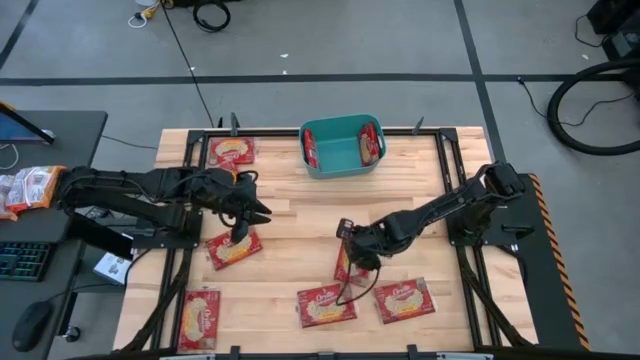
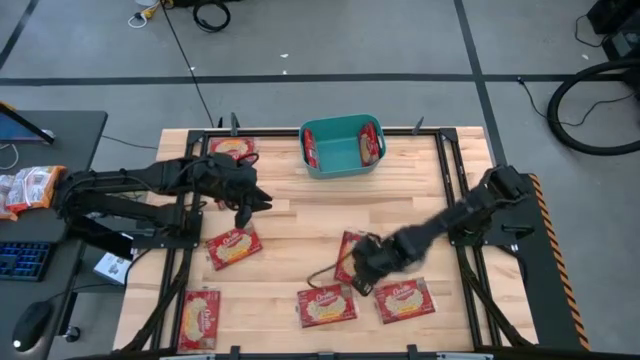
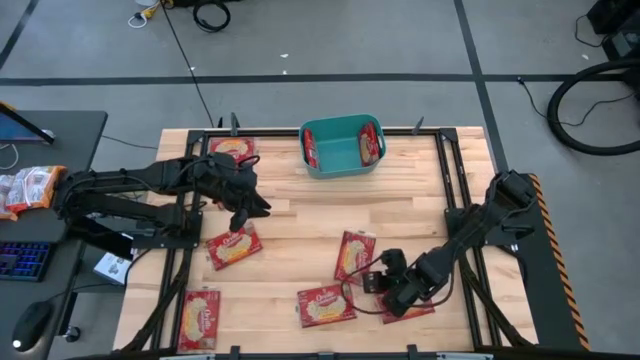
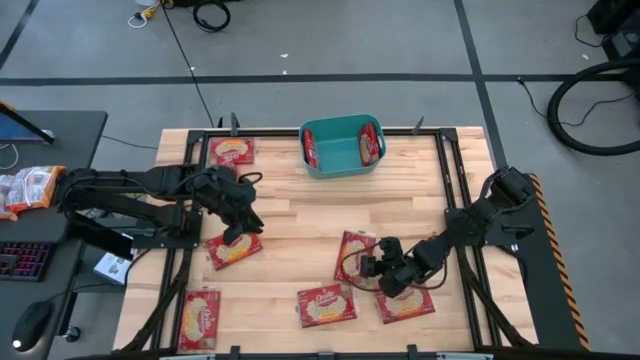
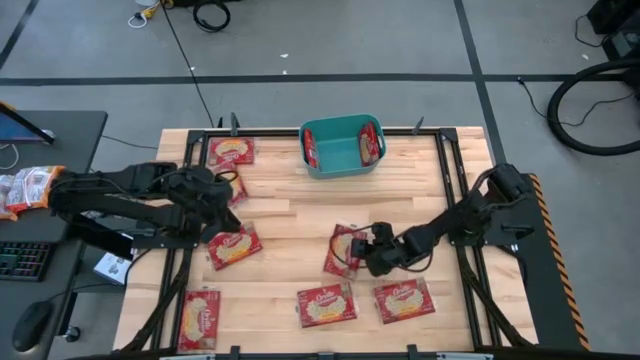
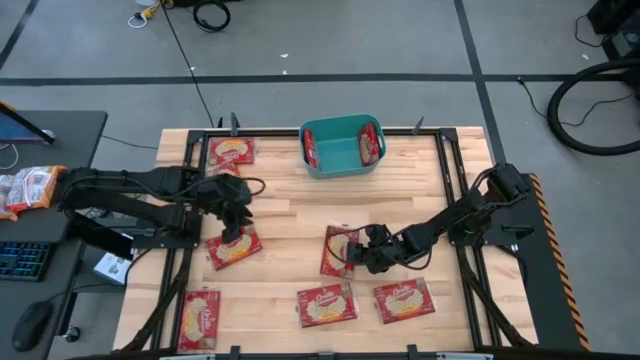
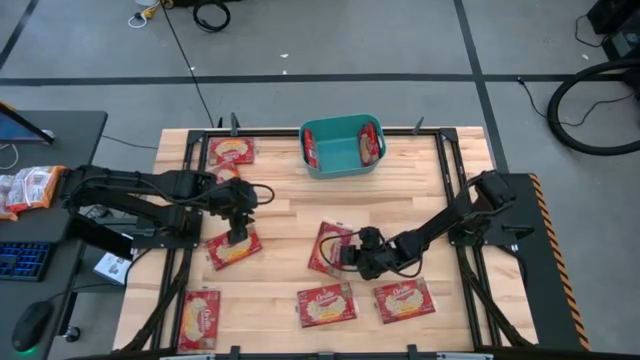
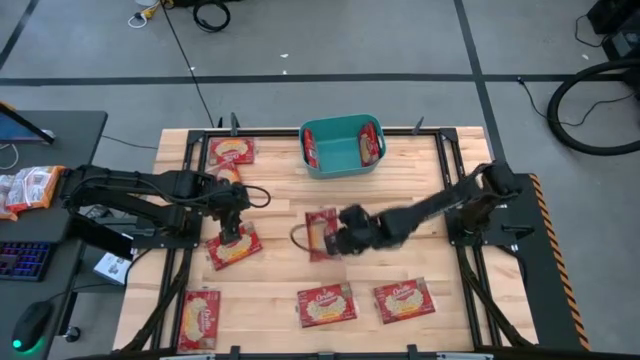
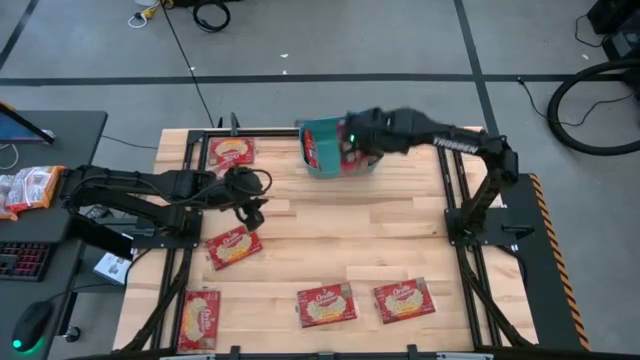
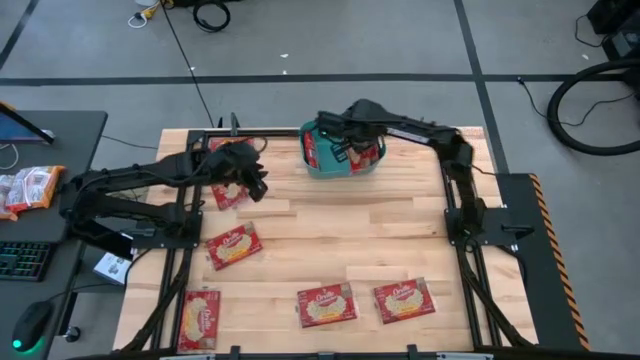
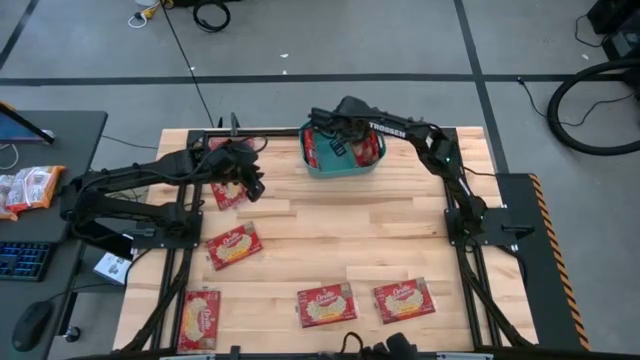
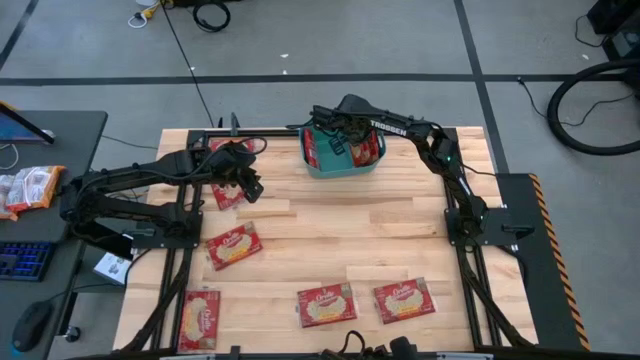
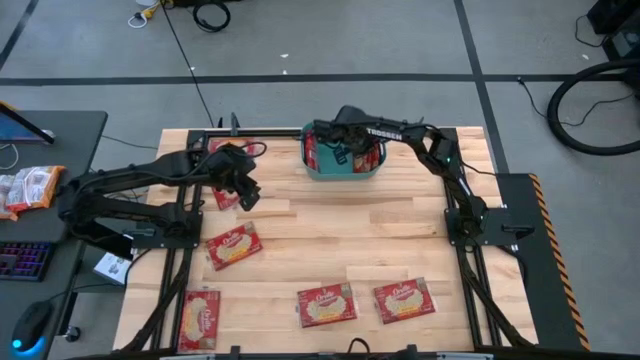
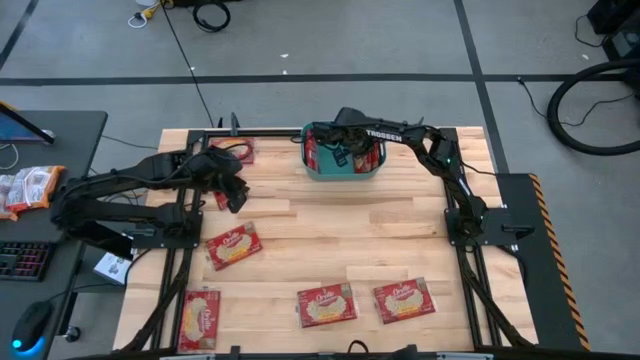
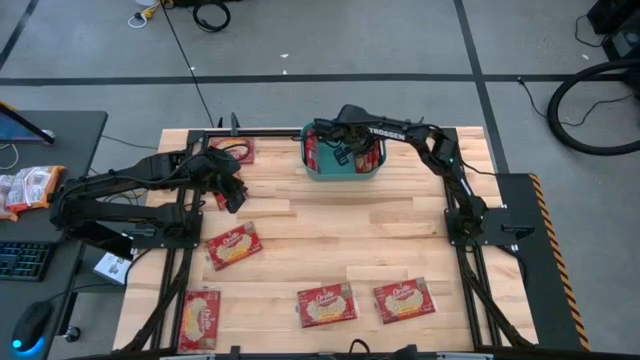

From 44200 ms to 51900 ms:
Task: Sort popcorn bags into baskets
Put the popcorn bag into the bin

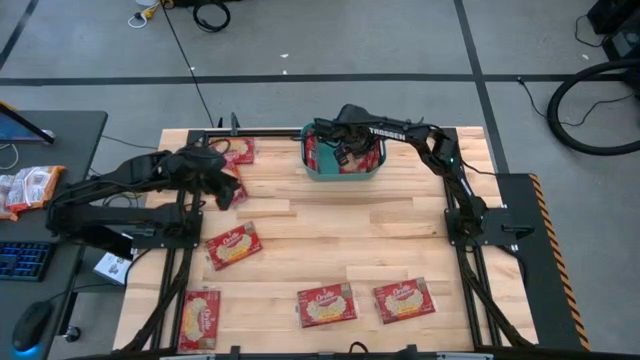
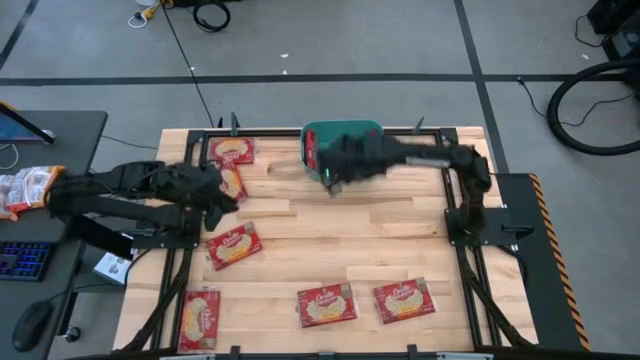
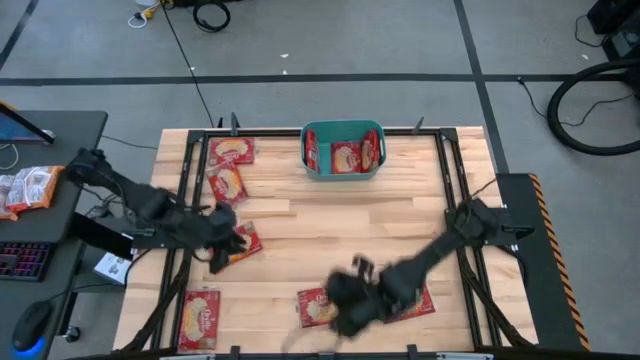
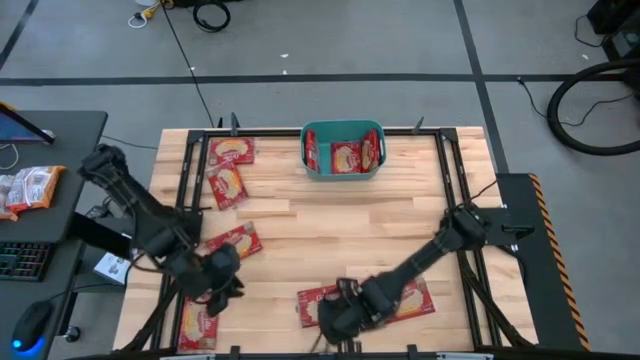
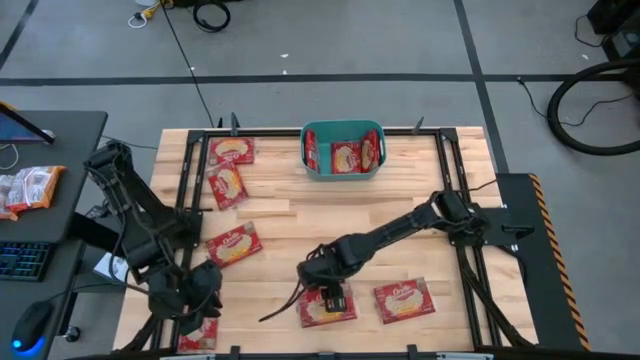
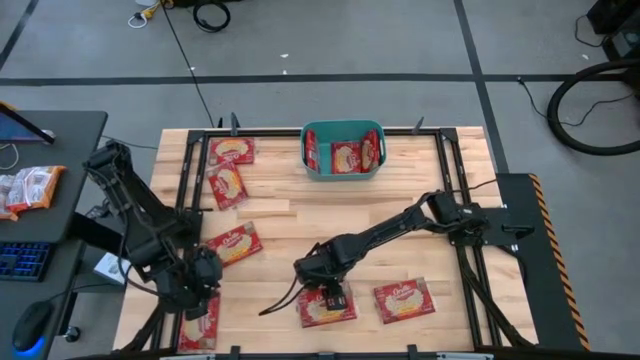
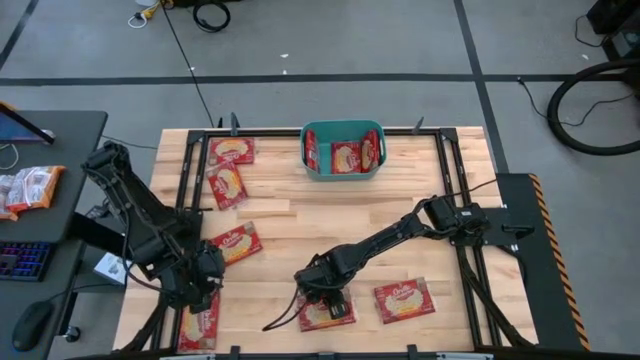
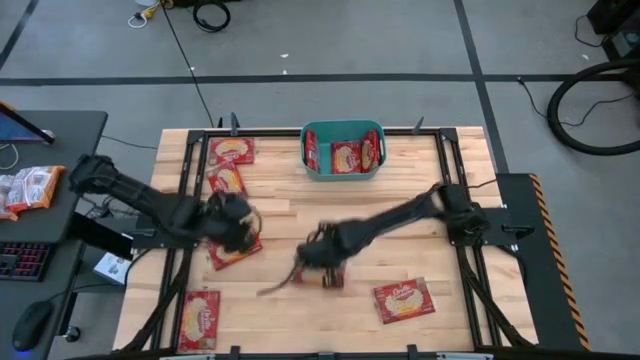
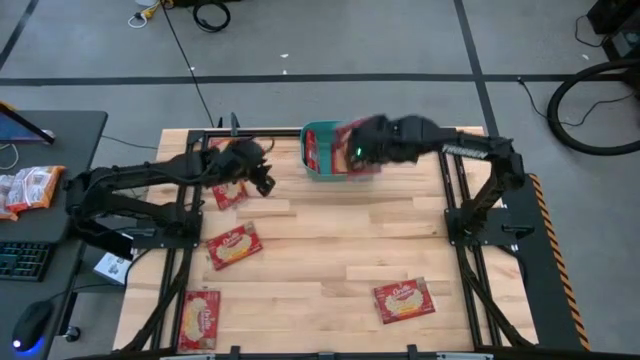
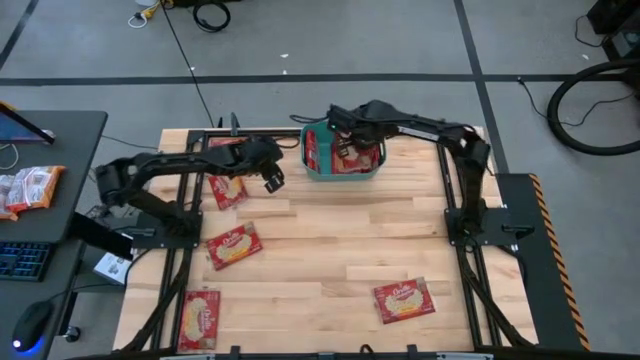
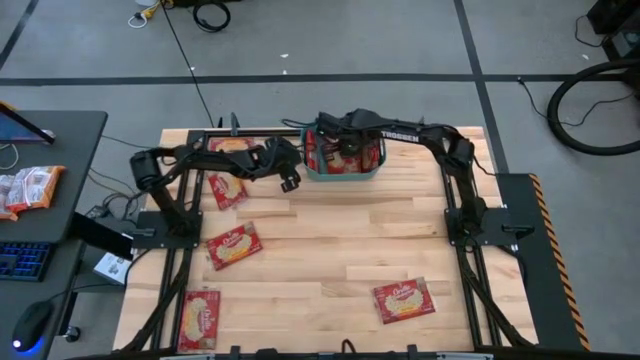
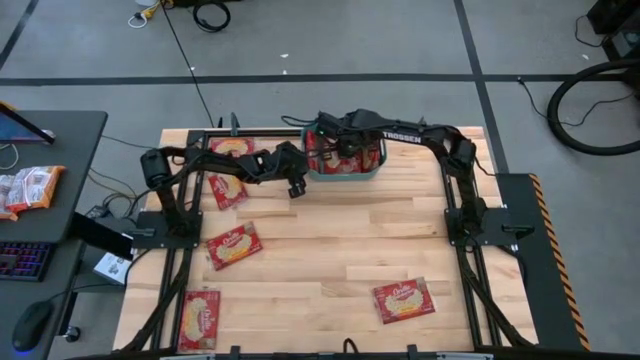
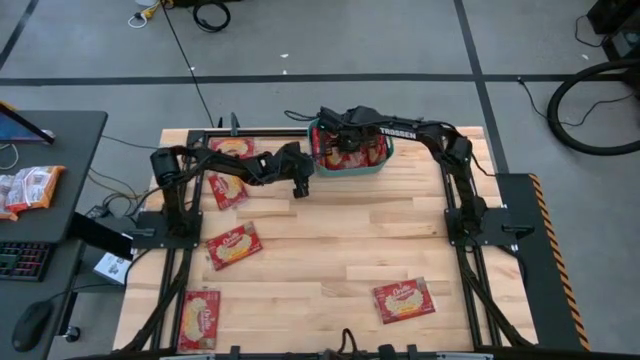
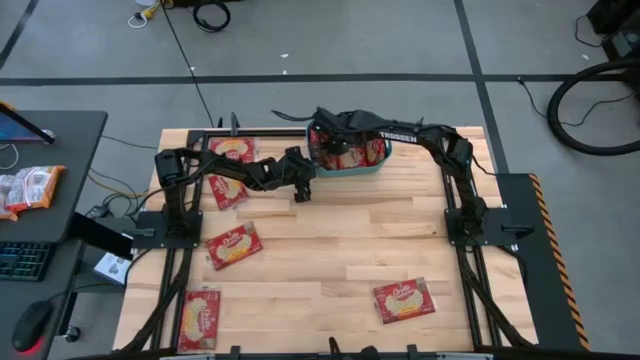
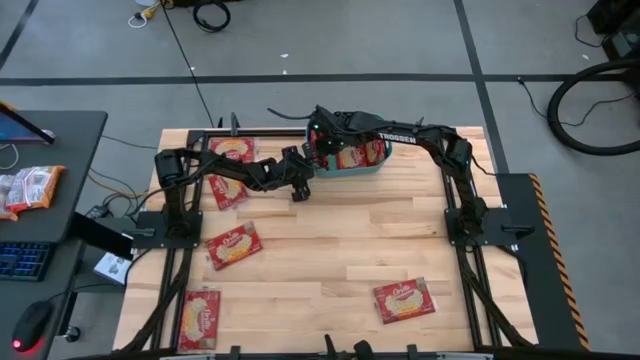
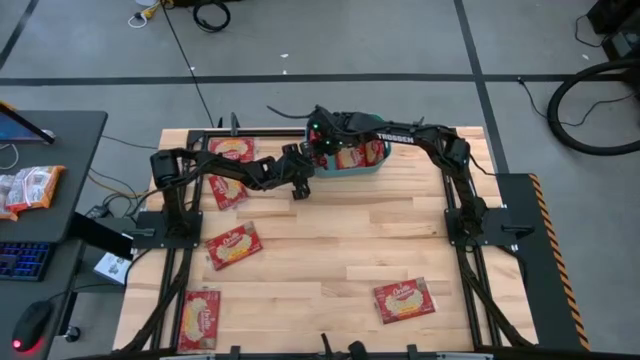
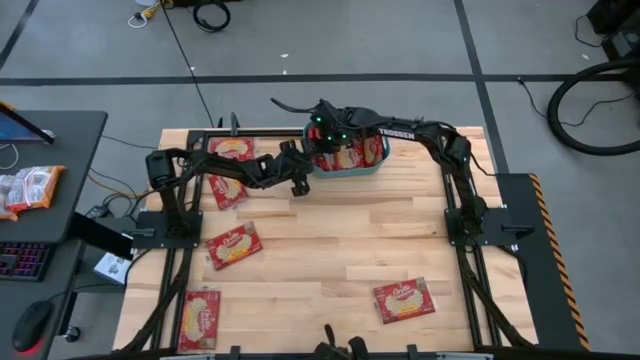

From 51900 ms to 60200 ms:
Put the popcorn bag into the bin

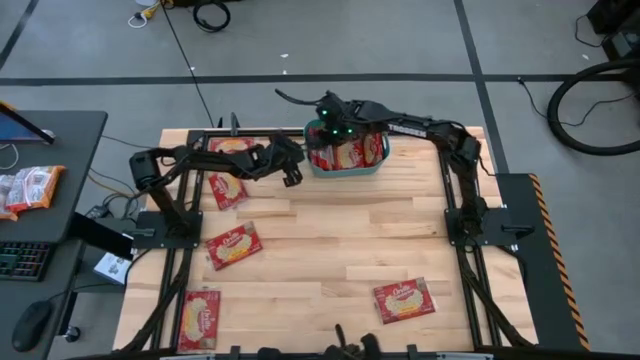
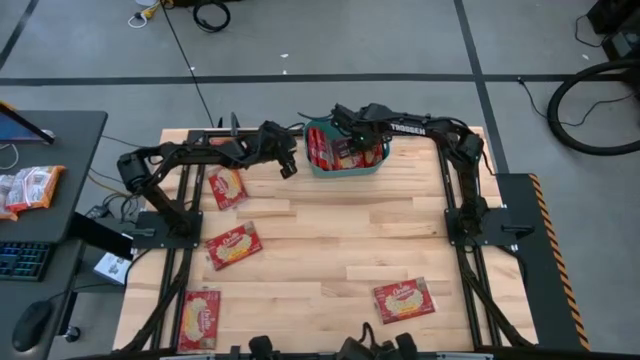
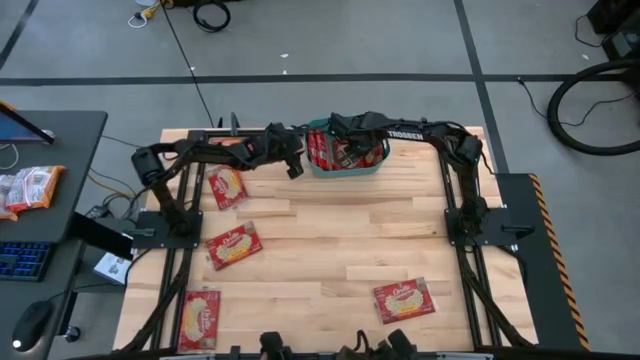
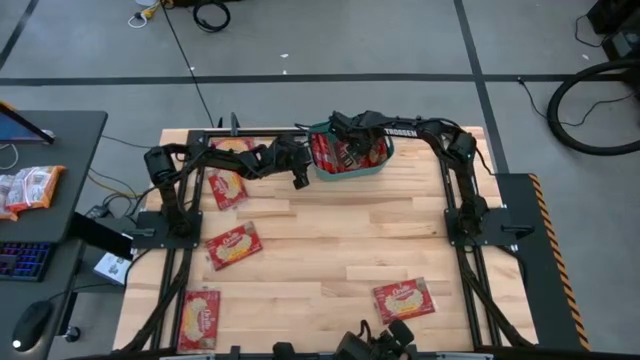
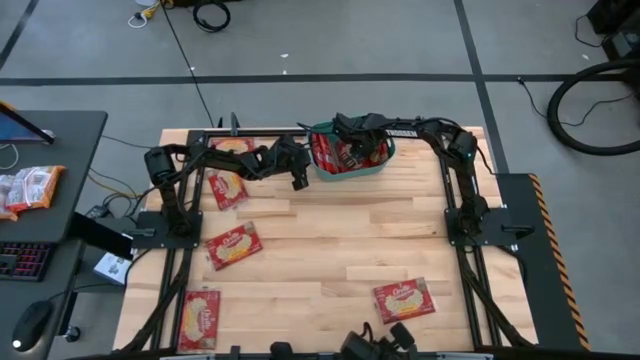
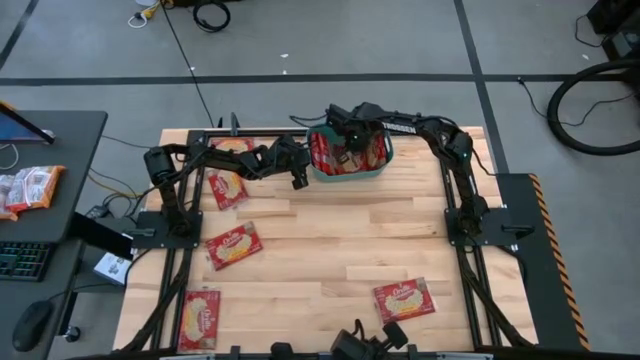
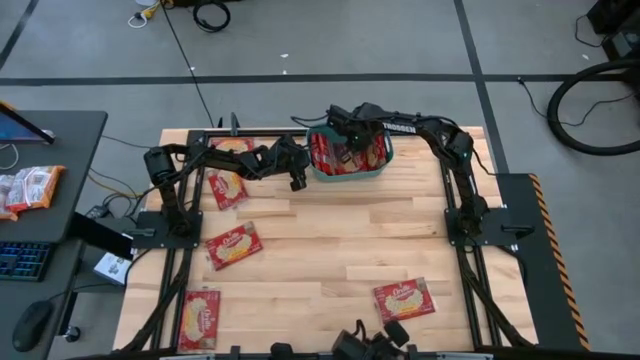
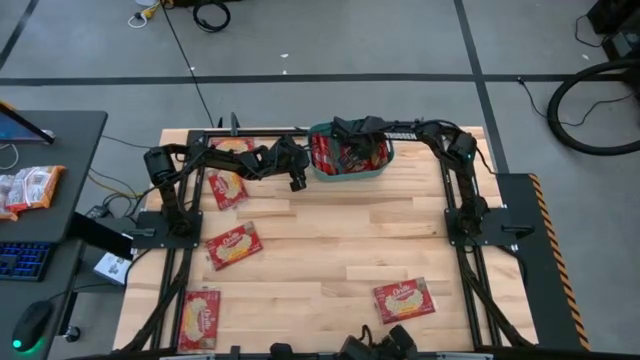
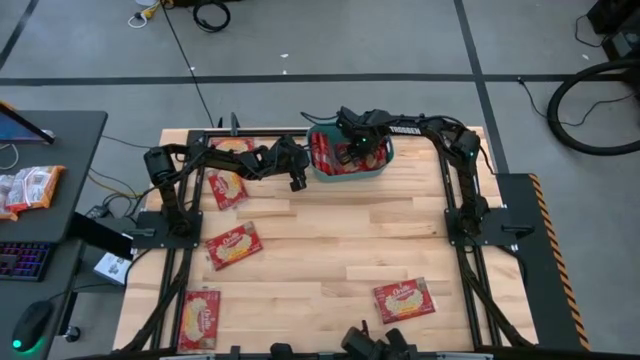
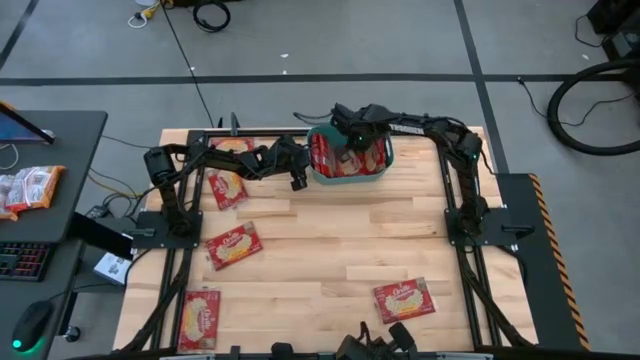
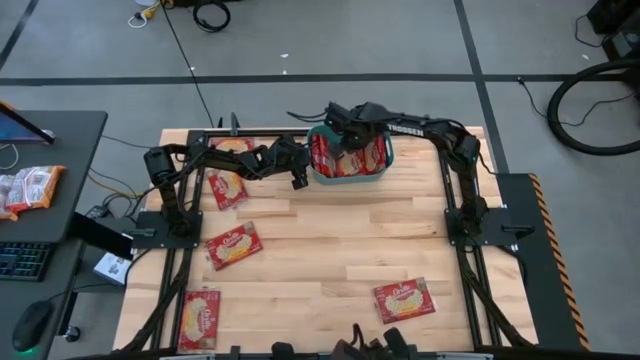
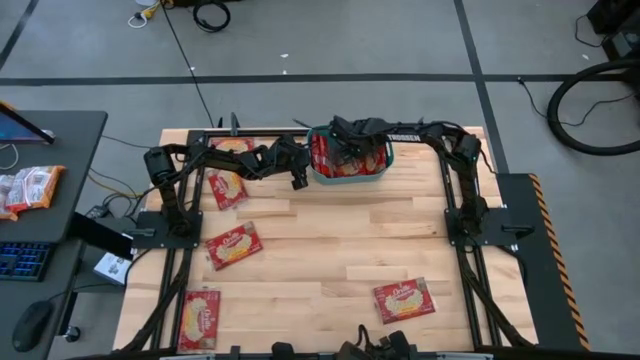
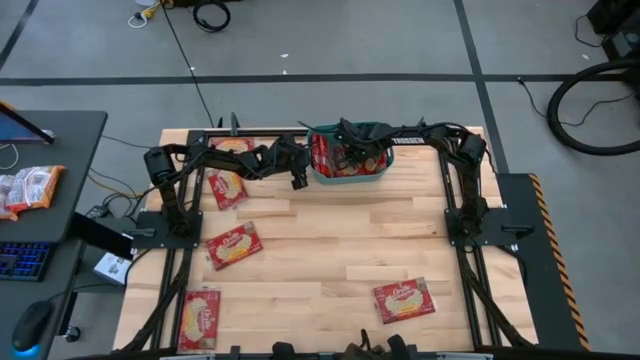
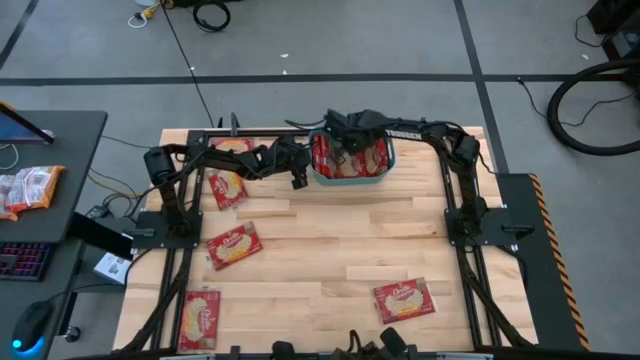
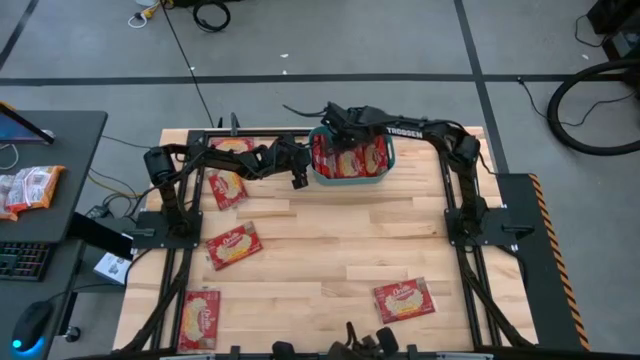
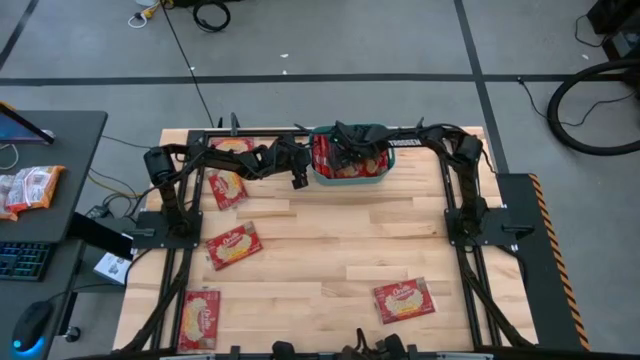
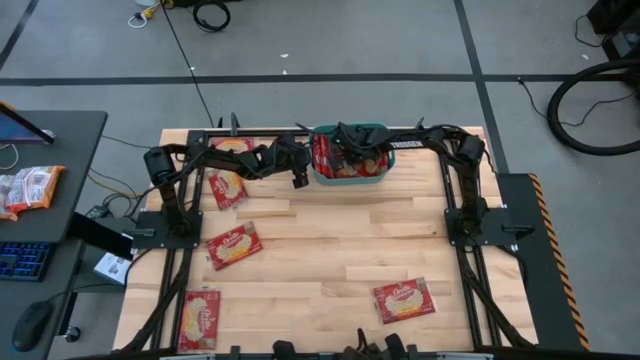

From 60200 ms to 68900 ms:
Adjust the popcorn bag in the bin
